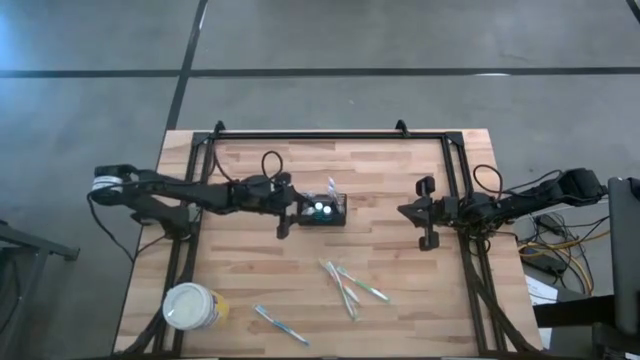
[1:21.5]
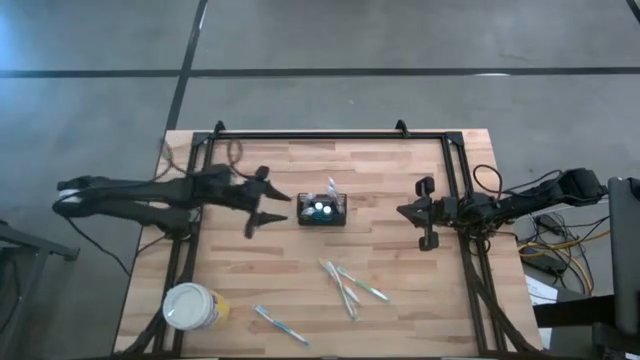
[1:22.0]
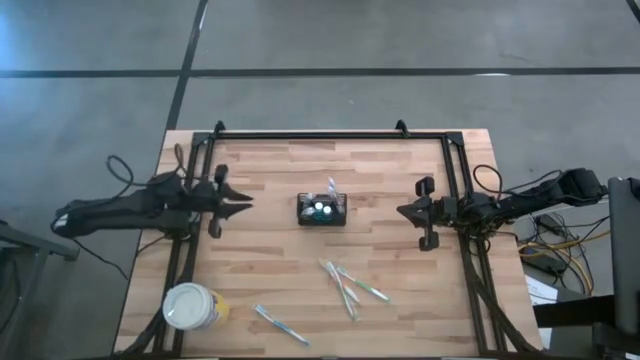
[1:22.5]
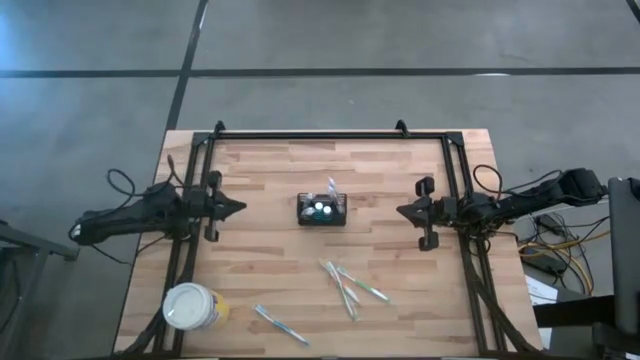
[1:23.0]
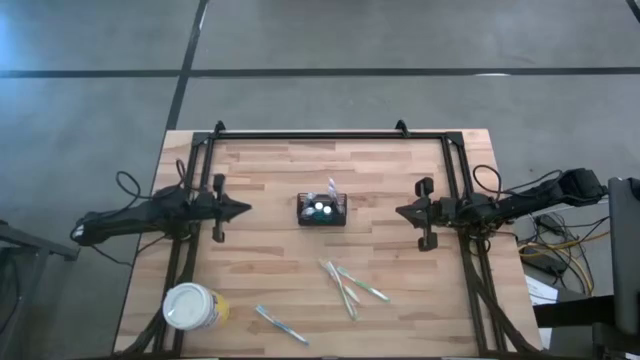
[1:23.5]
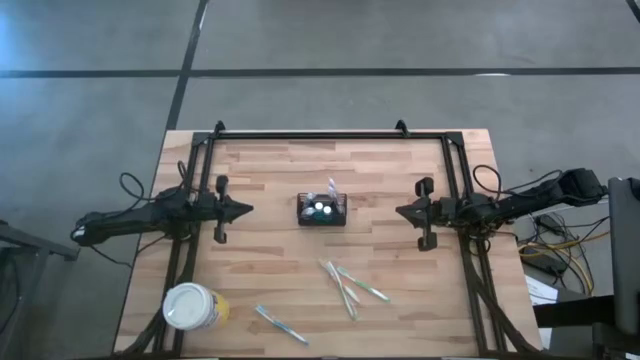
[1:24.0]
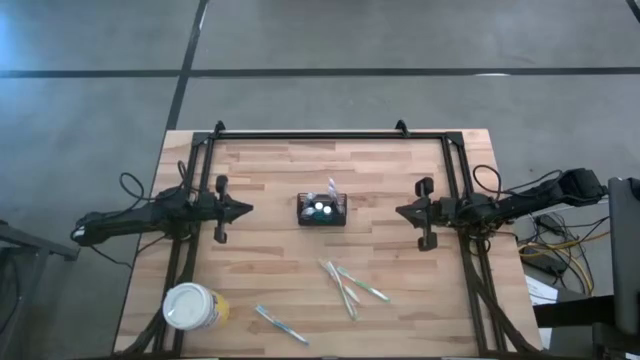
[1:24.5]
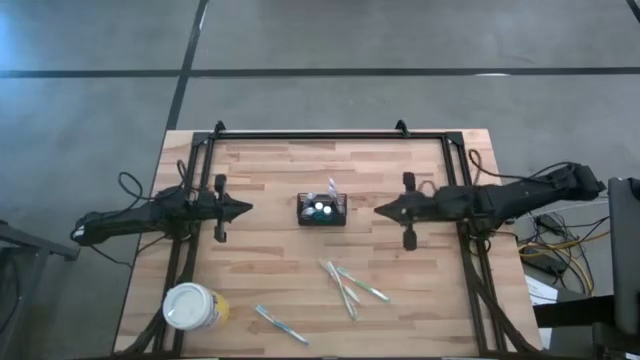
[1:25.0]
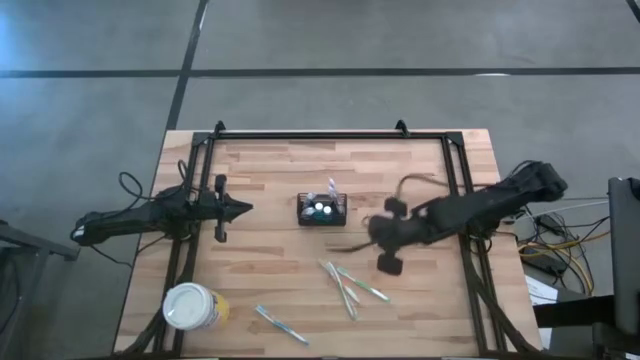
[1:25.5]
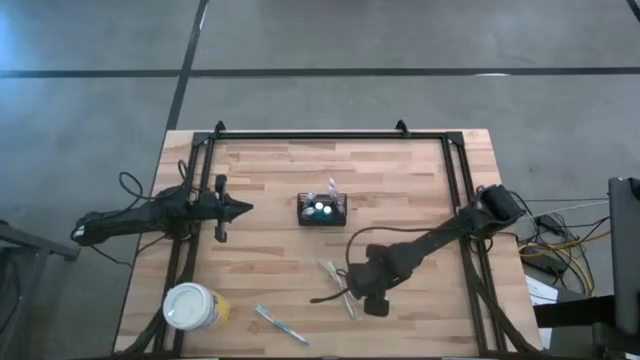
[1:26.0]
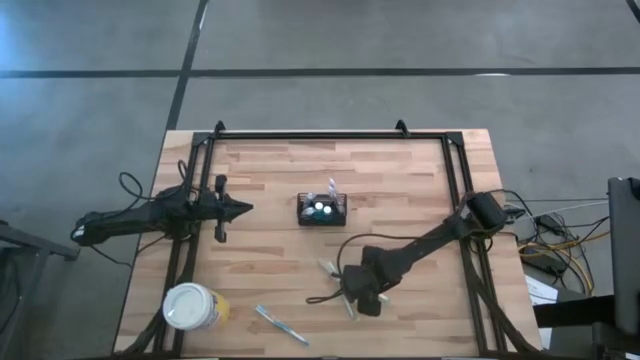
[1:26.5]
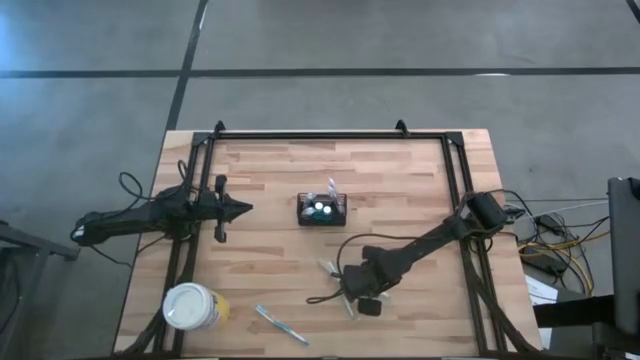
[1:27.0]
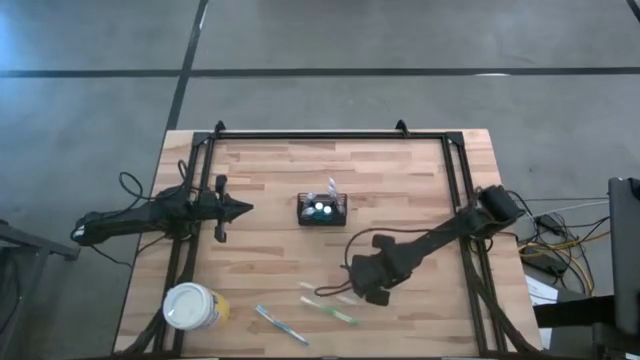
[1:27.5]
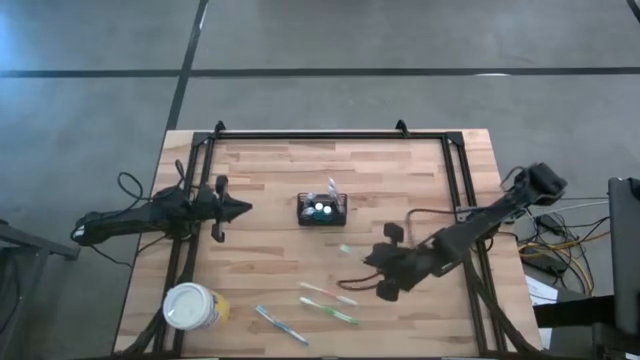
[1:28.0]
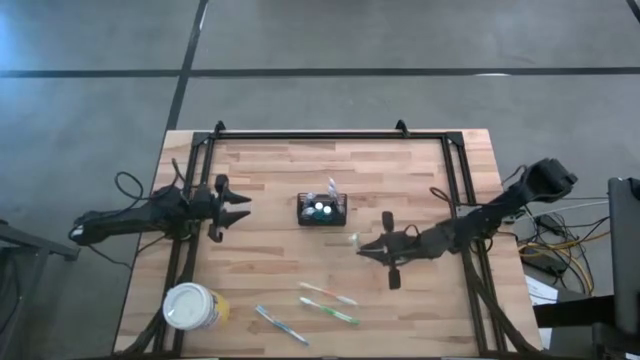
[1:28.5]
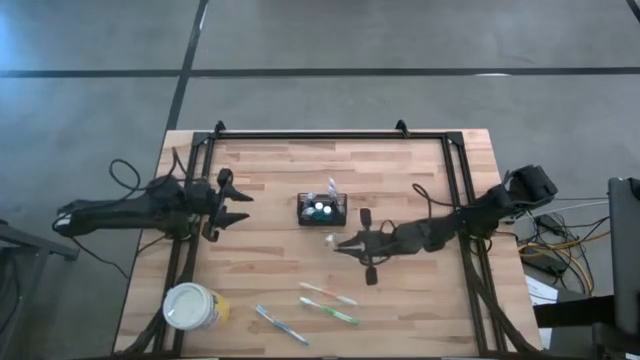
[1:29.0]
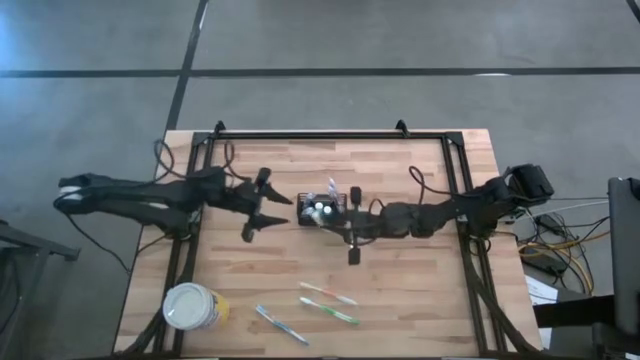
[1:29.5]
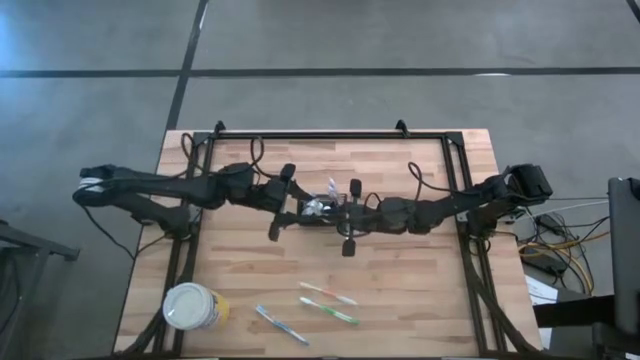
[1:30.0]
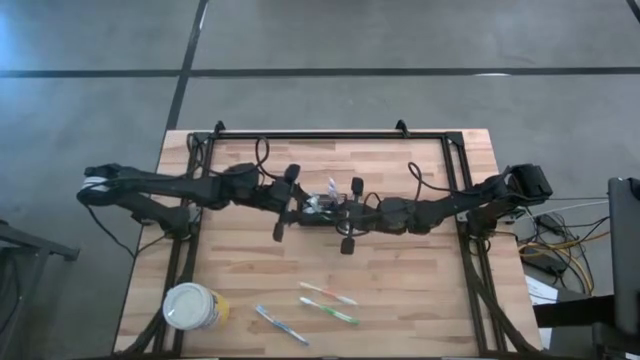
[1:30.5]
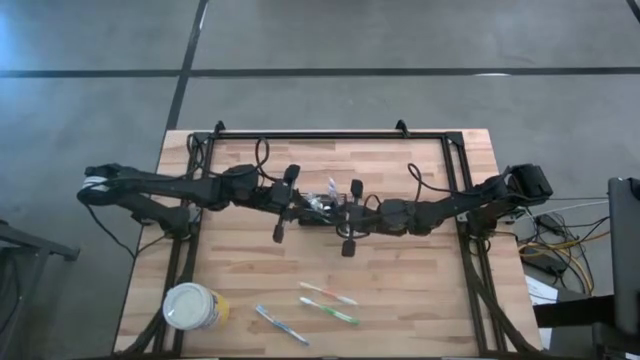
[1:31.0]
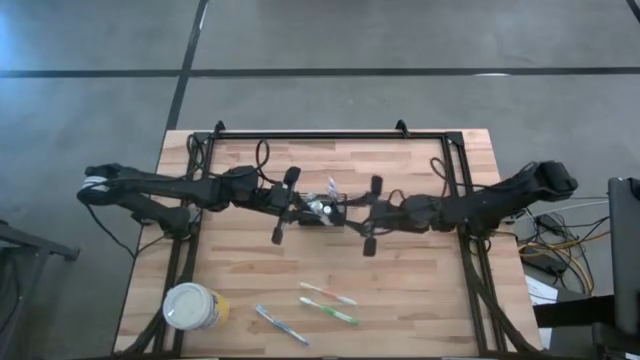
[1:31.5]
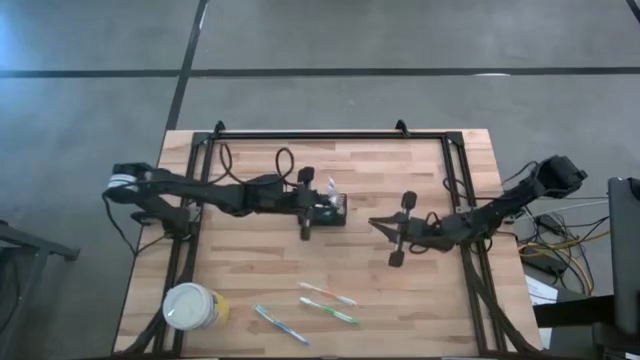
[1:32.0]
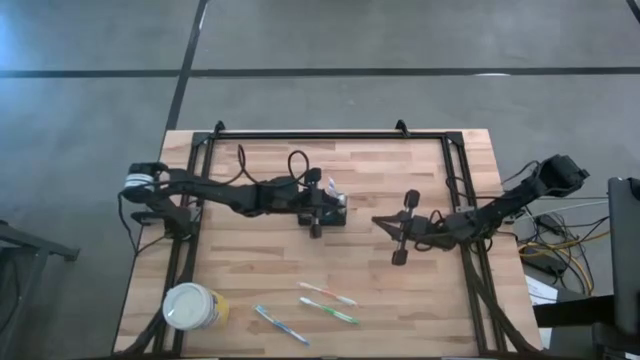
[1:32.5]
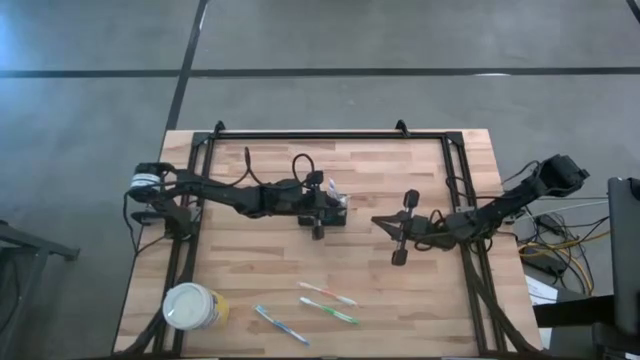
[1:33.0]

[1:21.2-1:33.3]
Task: Pick & Place toothbrushing station
Put the green toothbrush into the black wire organizer

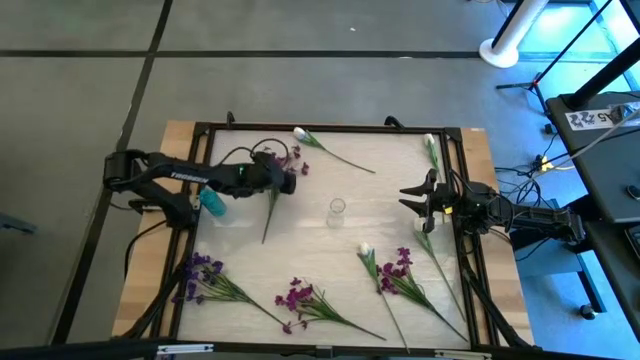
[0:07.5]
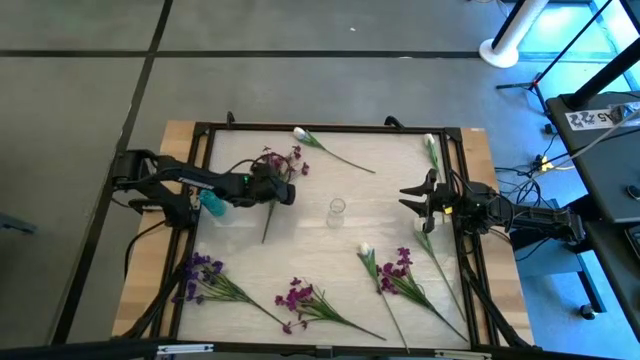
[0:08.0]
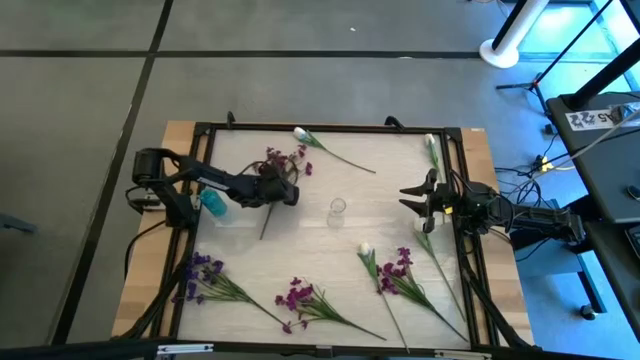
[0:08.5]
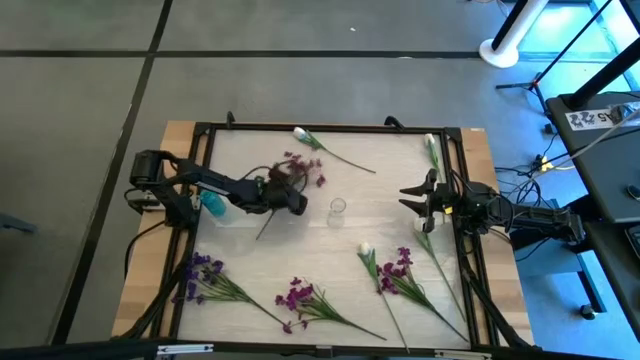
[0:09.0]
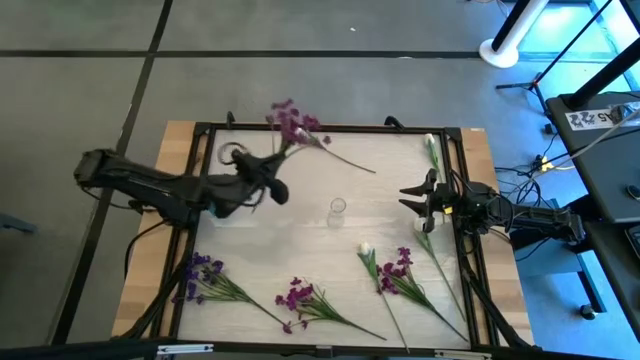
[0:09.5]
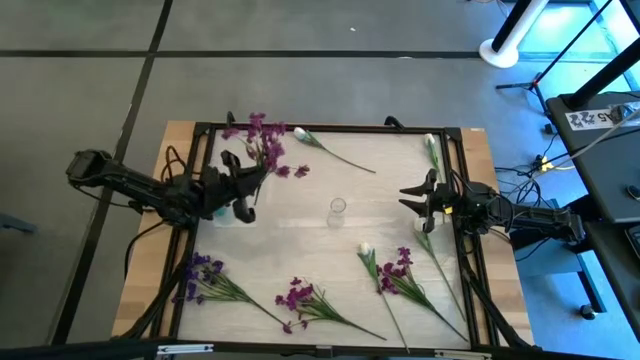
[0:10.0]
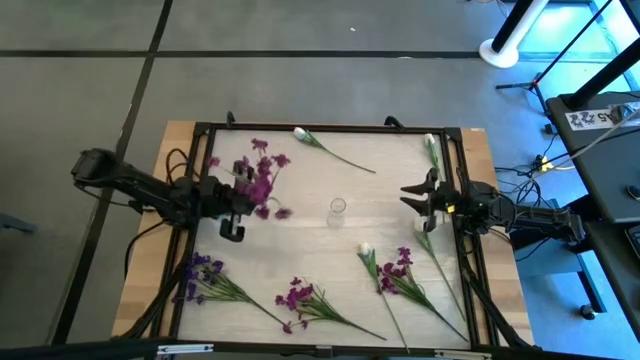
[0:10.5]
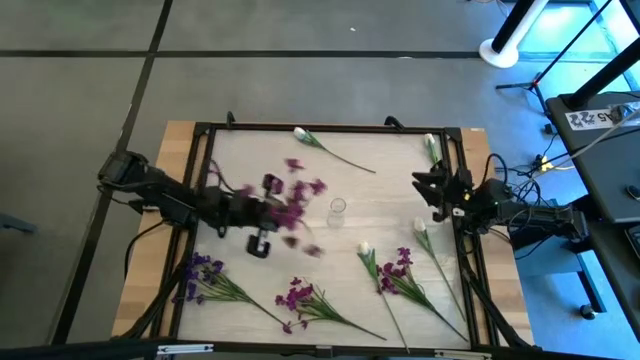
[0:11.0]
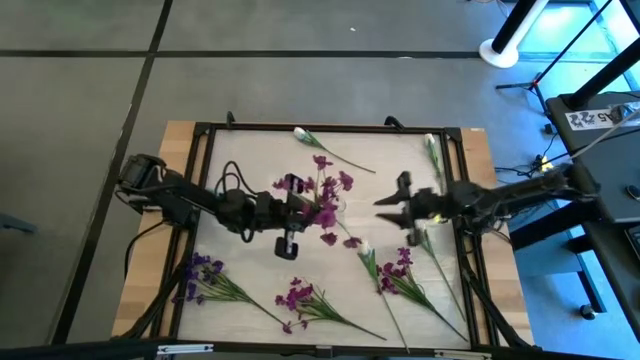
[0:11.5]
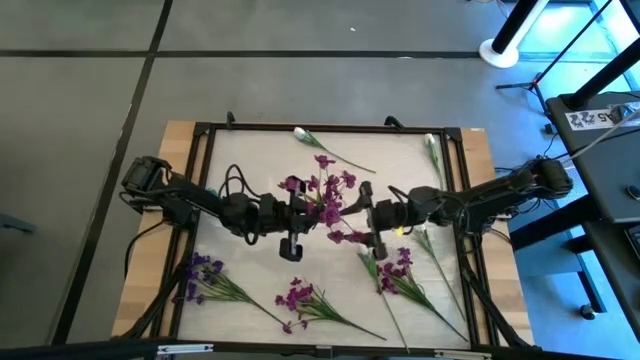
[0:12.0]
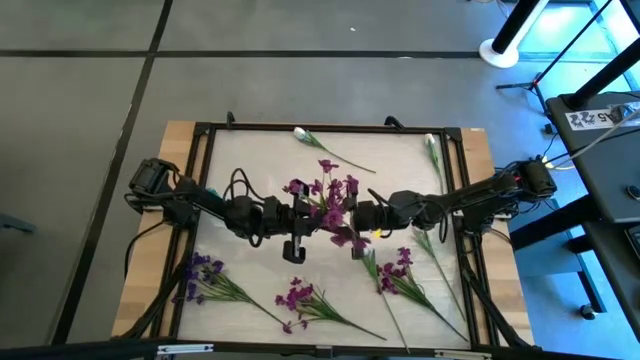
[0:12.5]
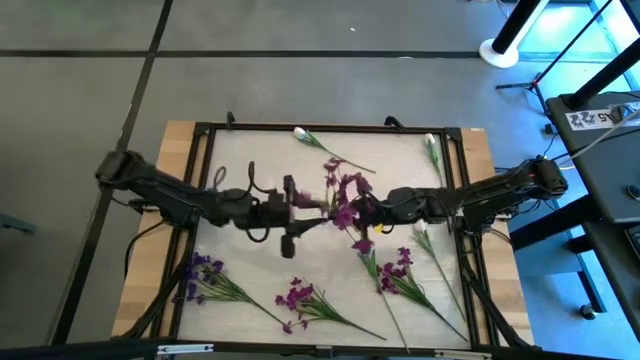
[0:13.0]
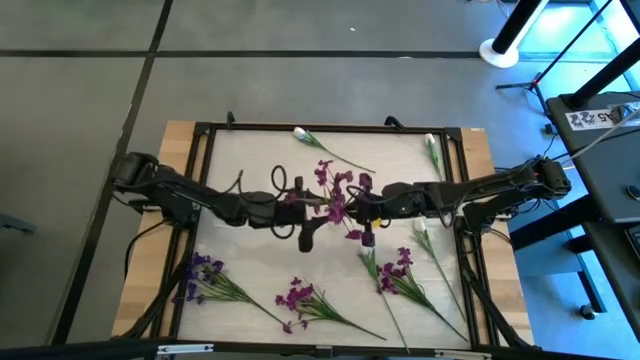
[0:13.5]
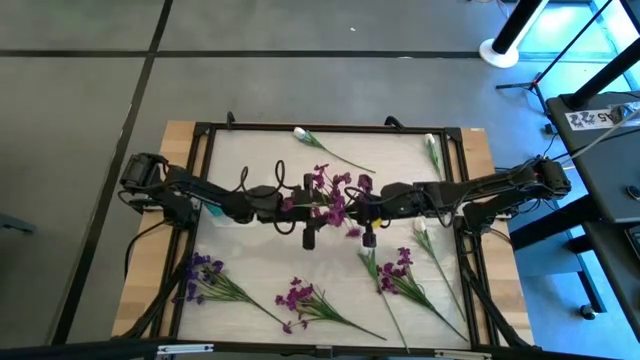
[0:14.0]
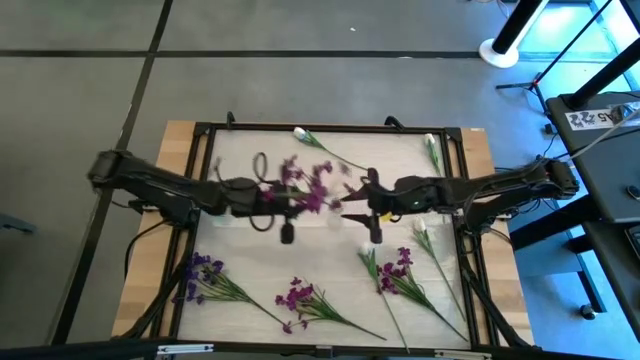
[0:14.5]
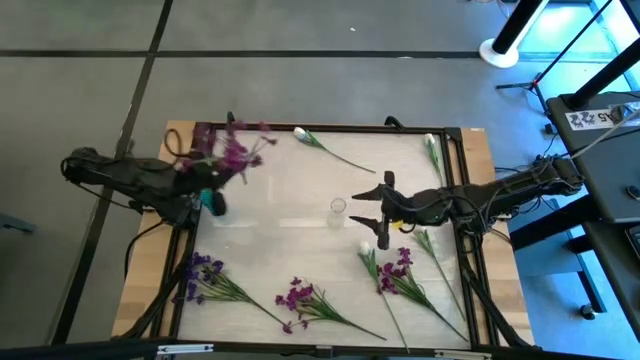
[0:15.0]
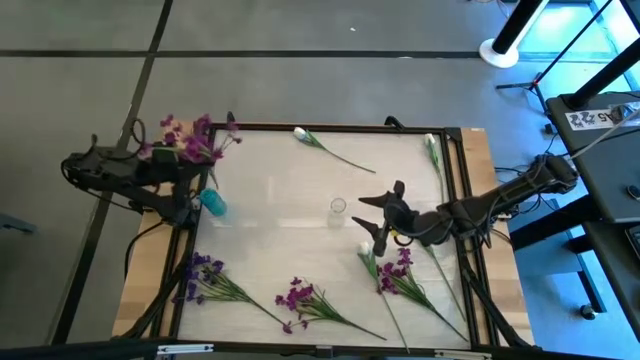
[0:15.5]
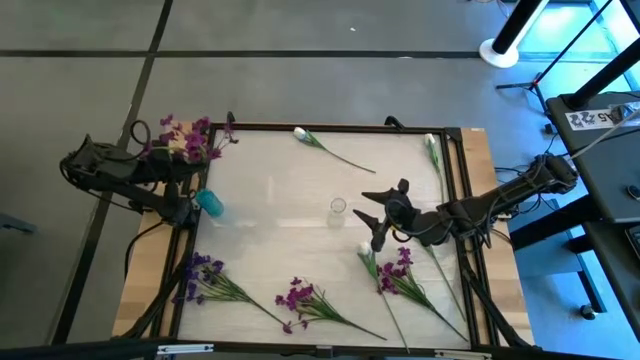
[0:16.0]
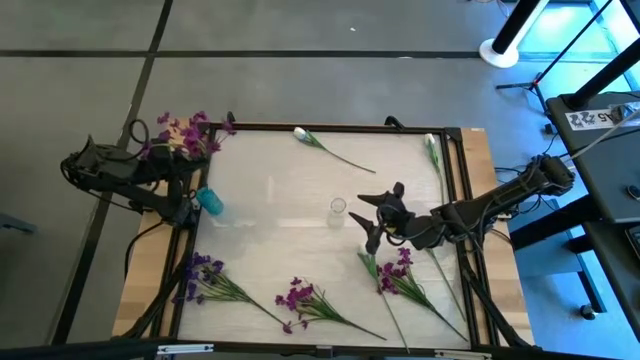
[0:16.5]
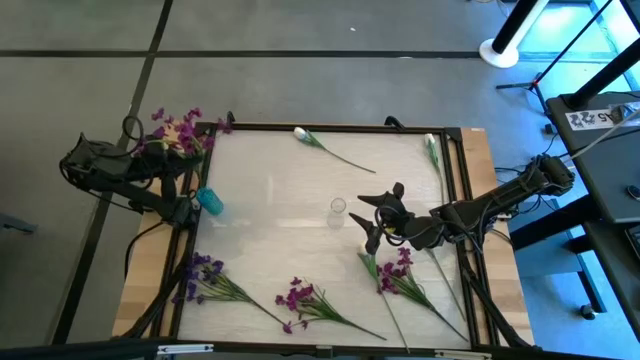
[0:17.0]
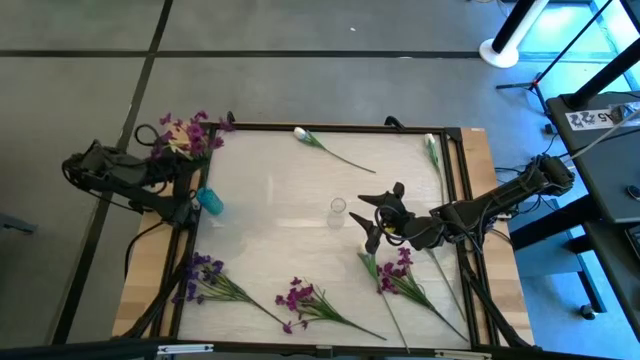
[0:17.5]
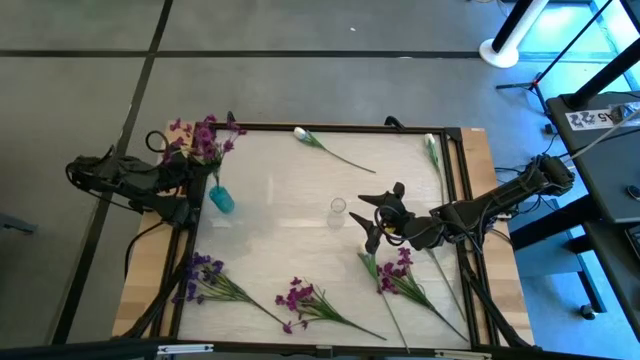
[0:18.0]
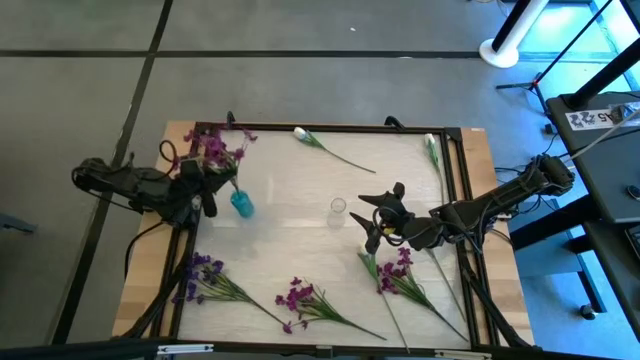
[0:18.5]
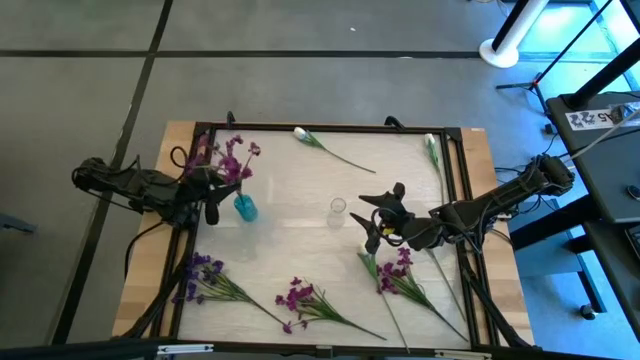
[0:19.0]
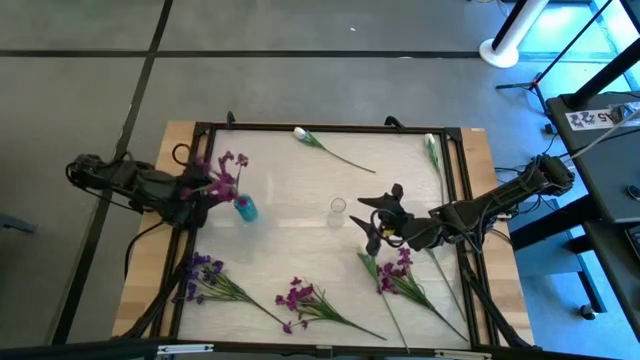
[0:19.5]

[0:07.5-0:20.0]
Task: Sort flowers into vase by color
Put the top purple flowers into the blue flower vase
